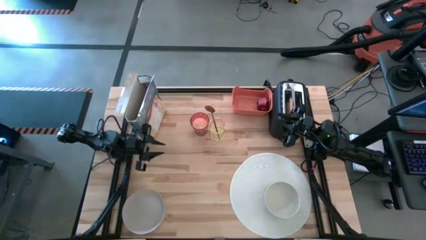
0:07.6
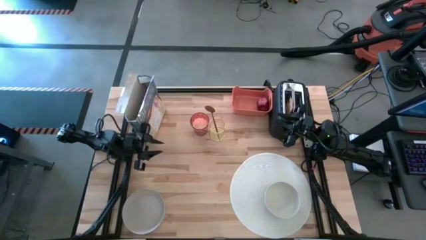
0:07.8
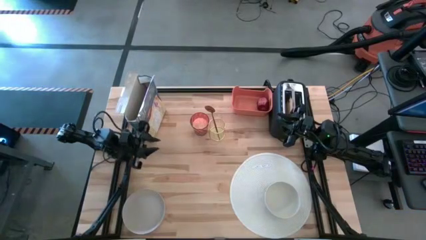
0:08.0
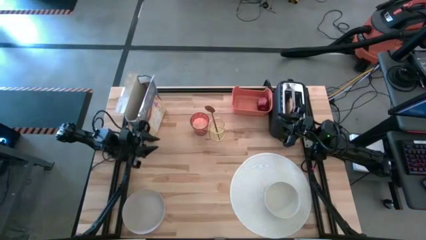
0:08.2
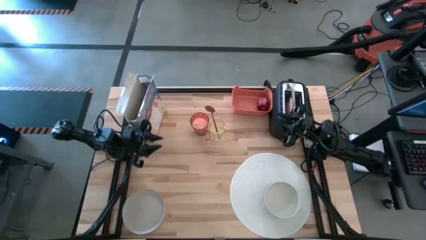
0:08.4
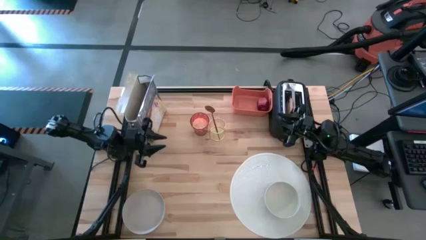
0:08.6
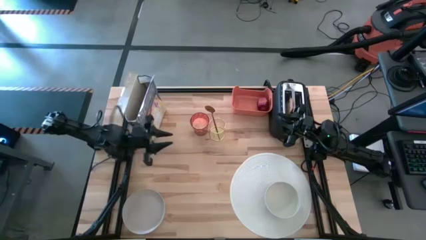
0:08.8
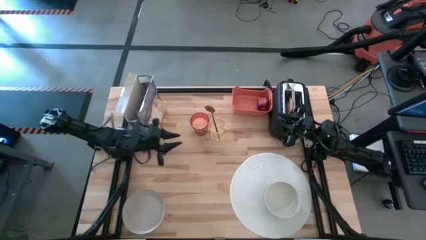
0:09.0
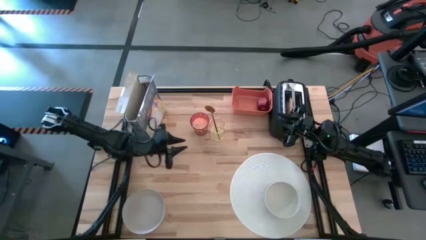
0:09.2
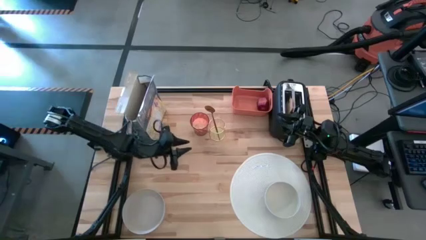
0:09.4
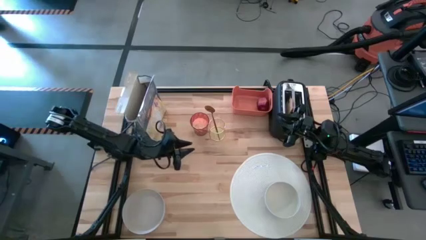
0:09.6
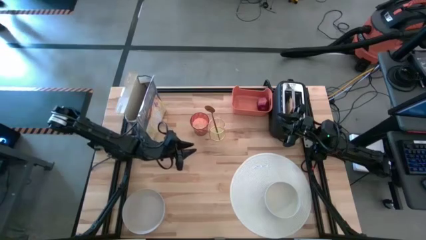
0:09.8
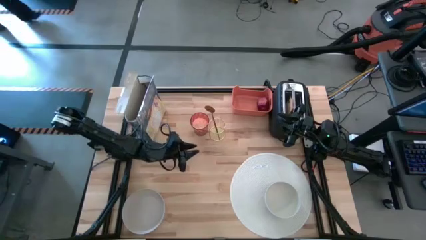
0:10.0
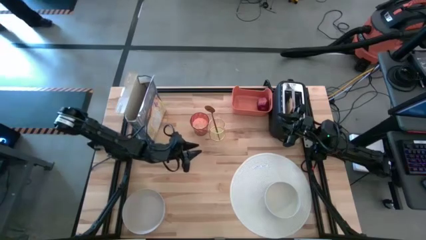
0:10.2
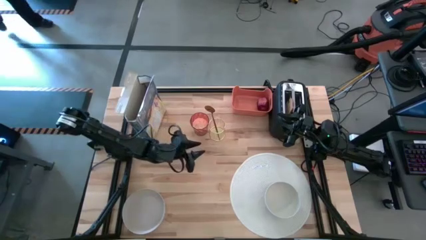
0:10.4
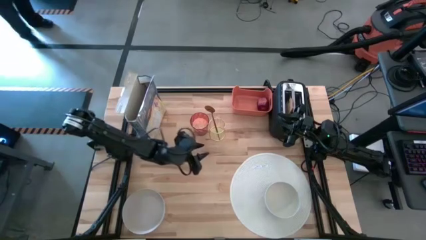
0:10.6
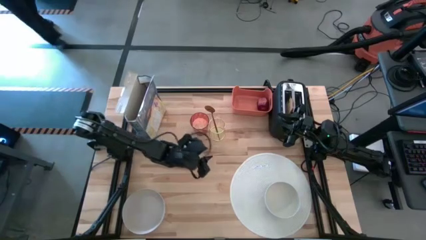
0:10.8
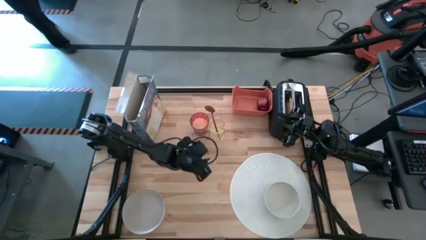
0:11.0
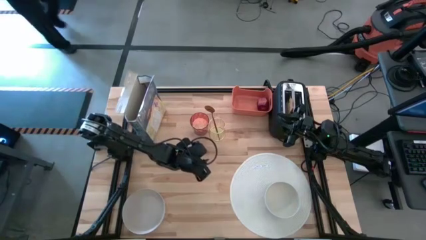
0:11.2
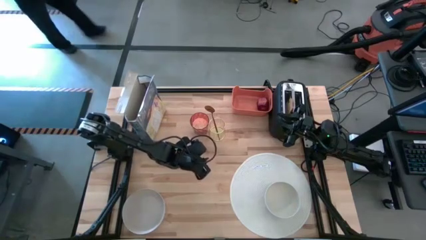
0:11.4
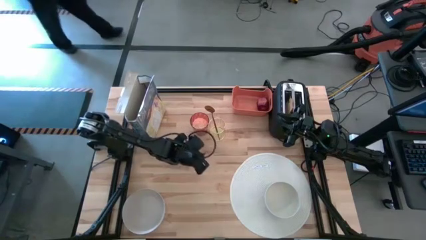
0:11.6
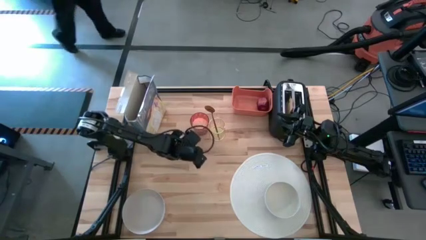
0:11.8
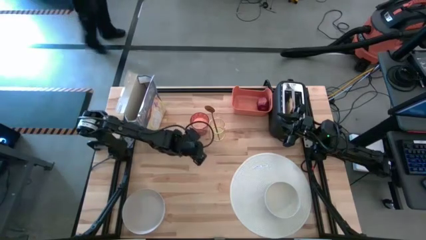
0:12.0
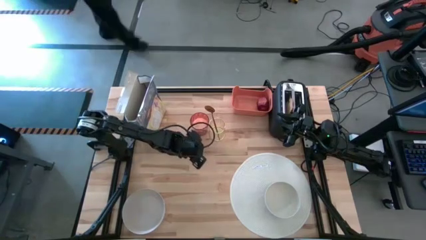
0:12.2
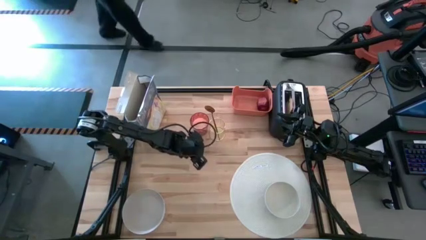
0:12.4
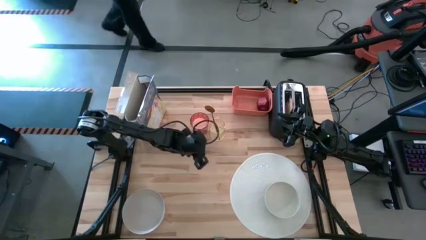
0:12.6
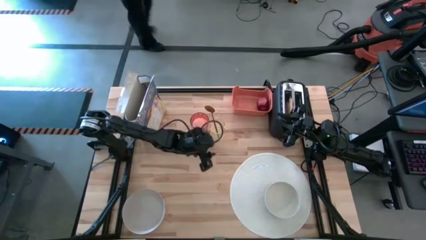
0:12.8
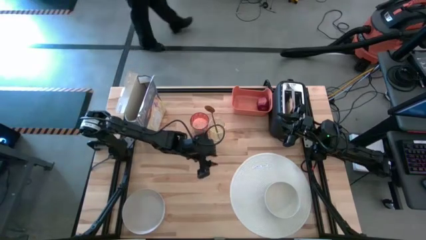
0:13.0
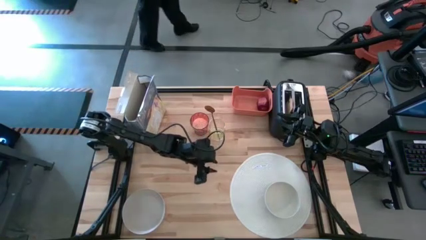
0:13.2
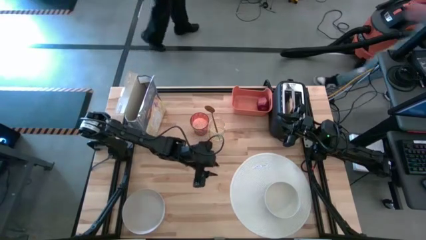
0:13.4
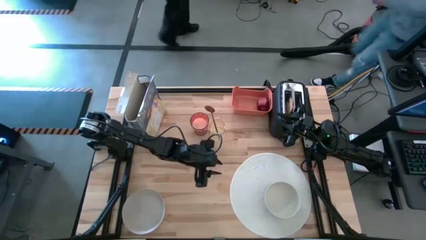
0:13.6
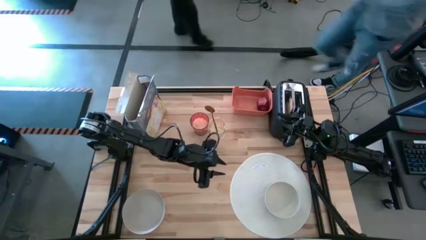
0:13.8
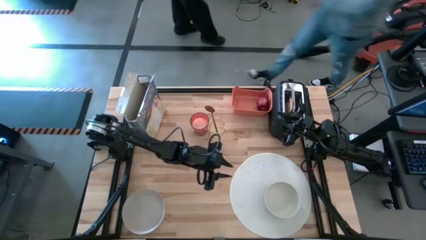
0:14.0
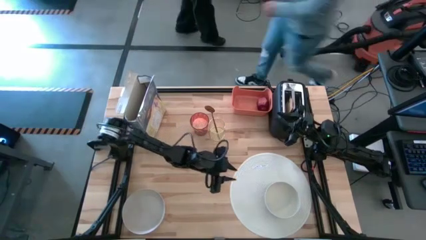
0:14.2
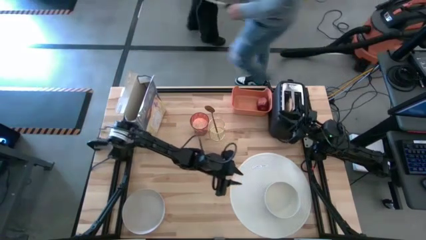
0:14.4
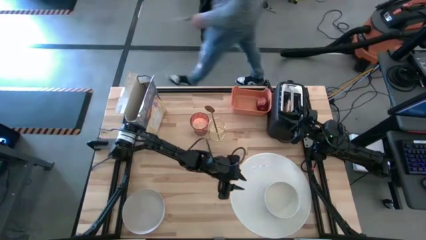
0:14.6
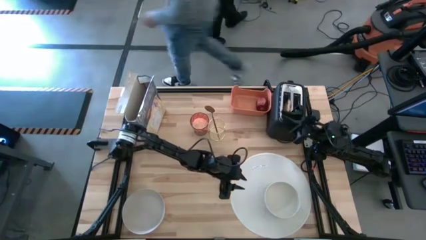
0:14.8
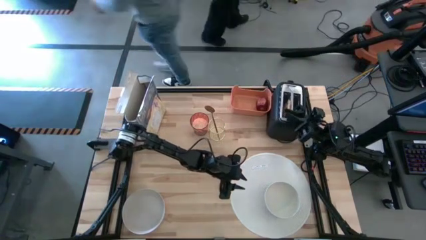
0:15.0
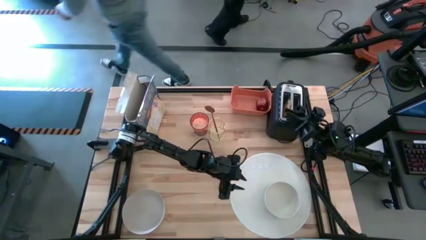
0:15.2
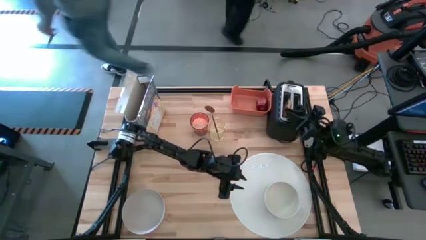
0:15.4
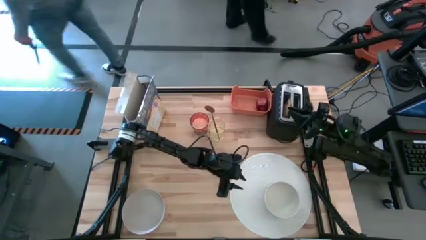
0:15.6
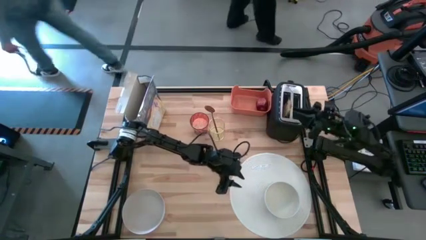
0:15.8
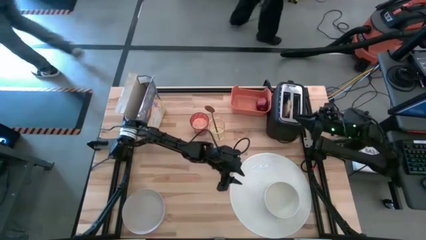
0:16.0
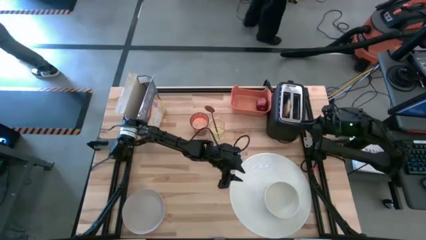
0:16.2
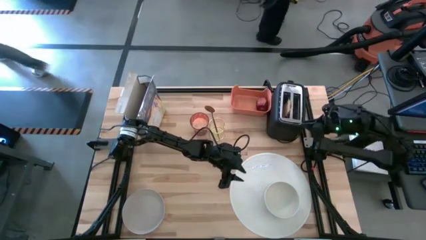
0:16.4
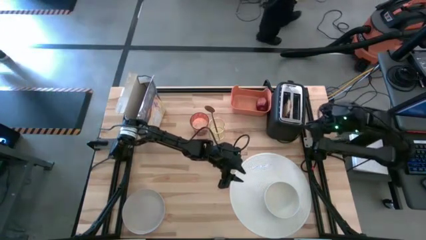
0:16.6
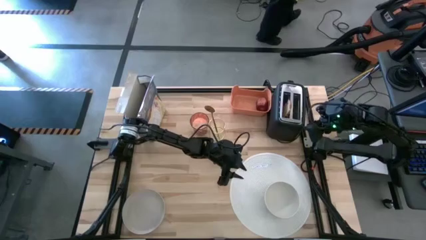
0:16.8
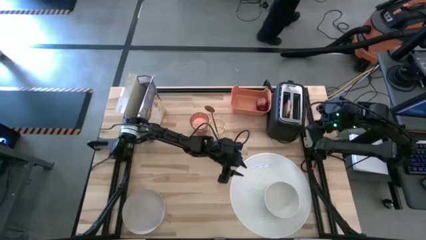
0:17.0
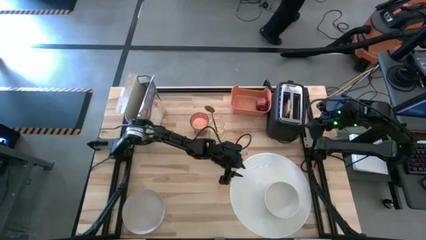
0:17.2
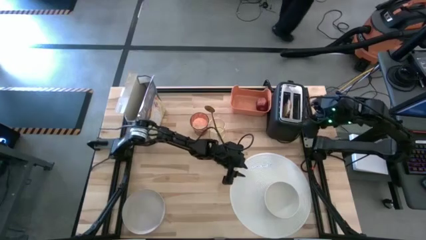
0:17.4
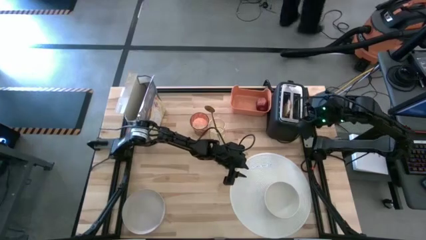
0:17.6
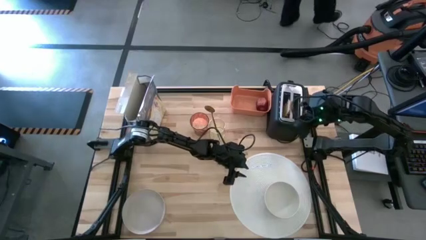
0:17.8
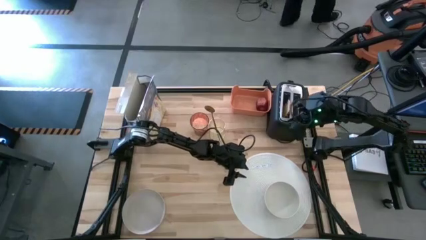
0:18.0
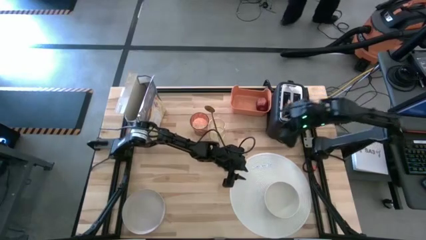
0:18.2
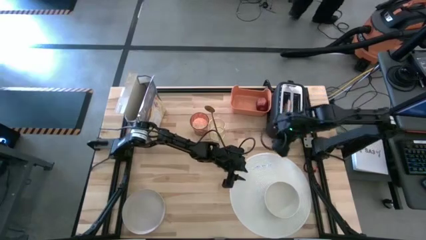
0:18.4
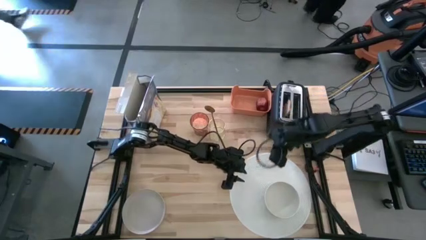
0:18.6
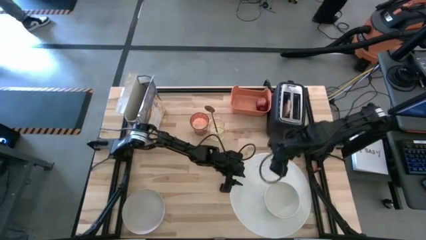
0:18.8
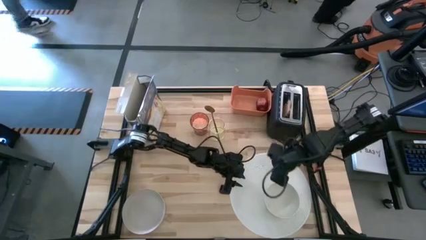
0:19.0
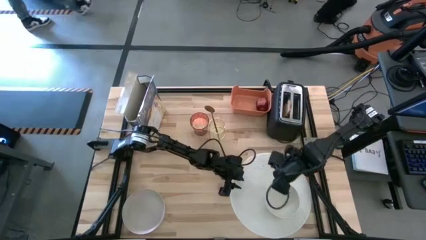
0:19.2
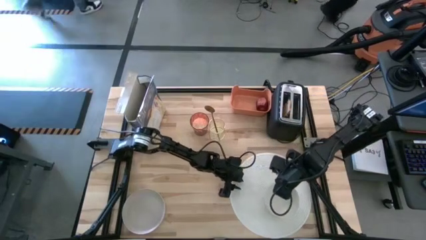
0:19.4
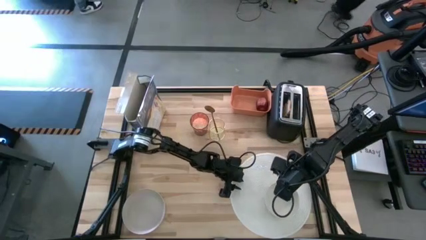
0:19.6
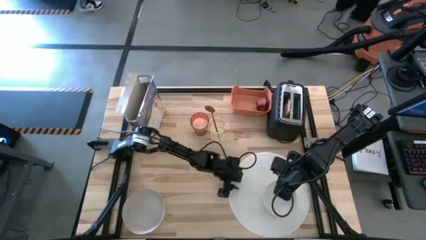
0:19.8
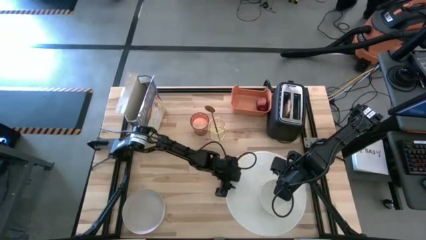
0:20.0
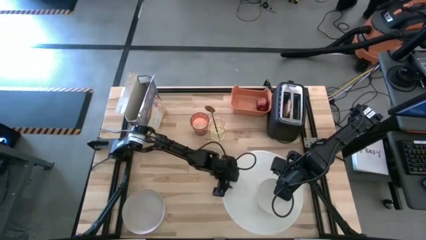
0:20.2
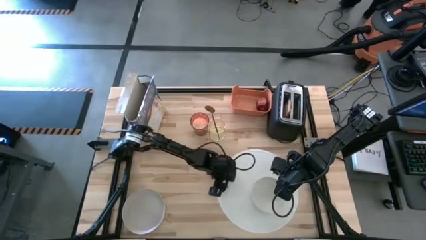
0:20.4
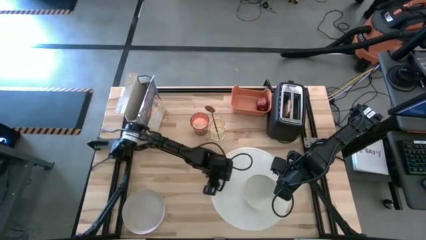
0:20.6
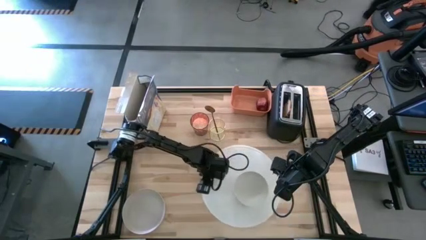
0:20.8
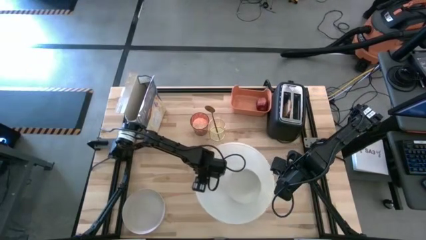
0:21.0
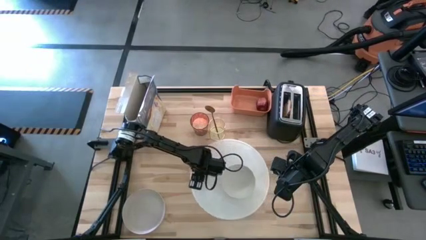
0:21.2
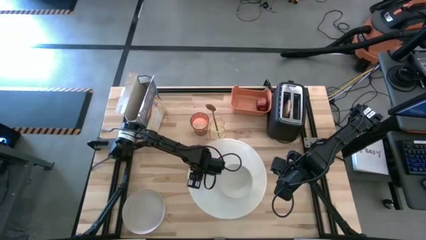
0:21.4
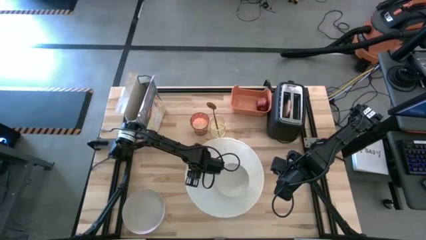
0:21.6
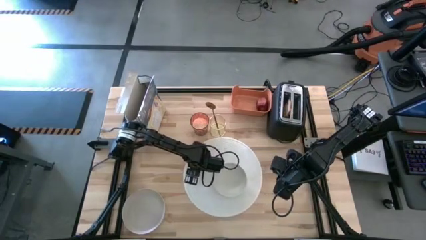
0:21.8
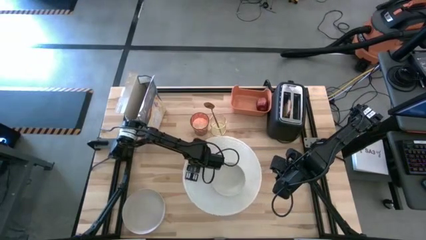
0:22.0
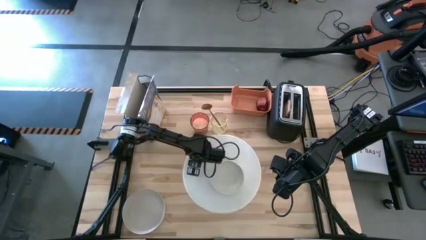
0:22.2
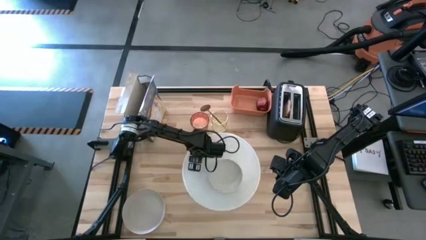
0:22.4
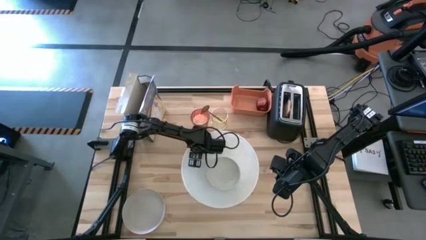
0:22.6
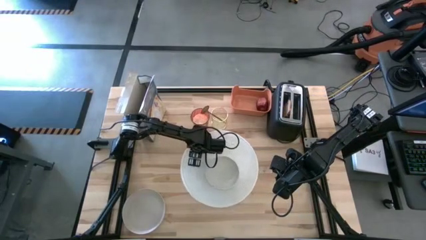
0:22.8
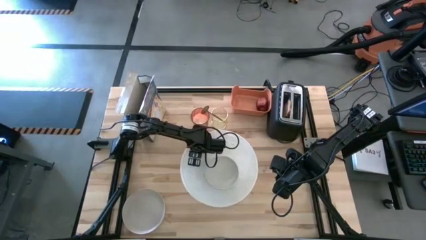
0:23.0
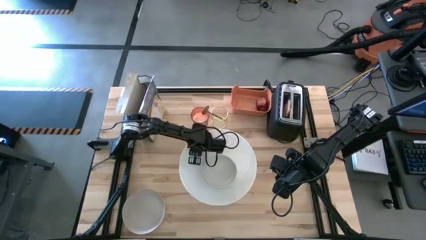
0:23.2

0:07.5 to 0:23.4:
Task: Arrange a breakfast setting
Move the white placemat to the center of the table
